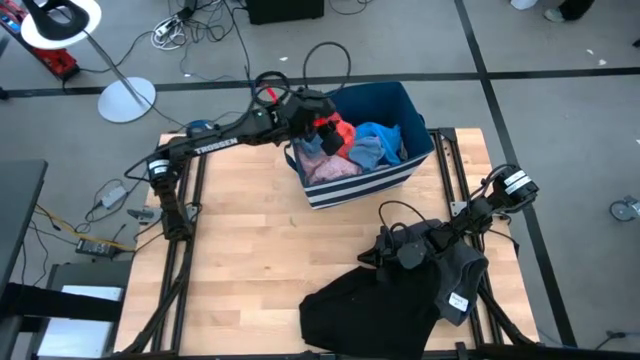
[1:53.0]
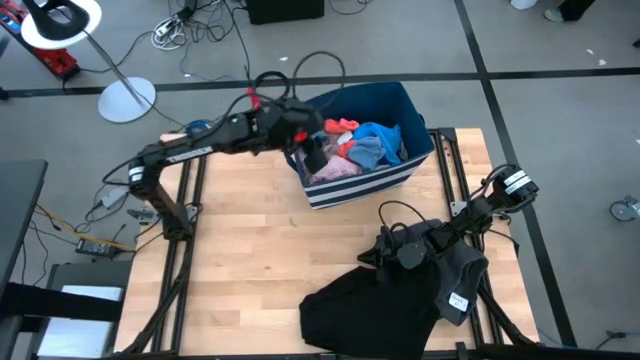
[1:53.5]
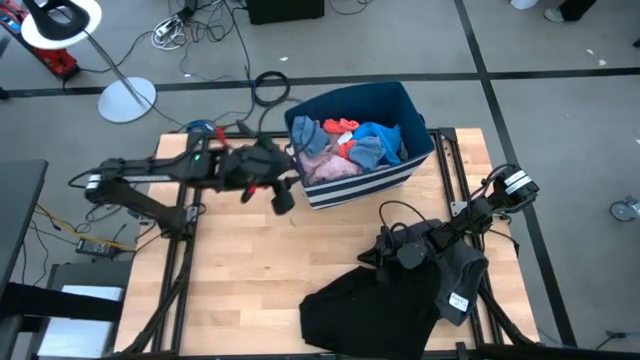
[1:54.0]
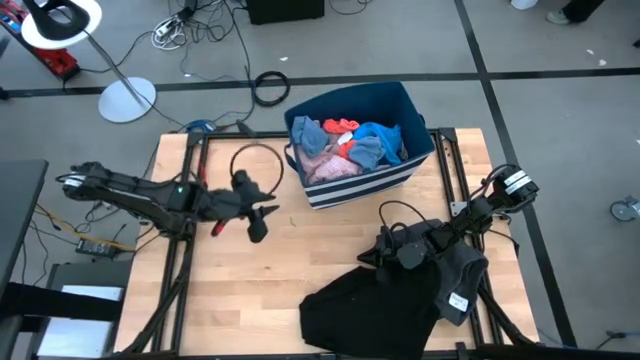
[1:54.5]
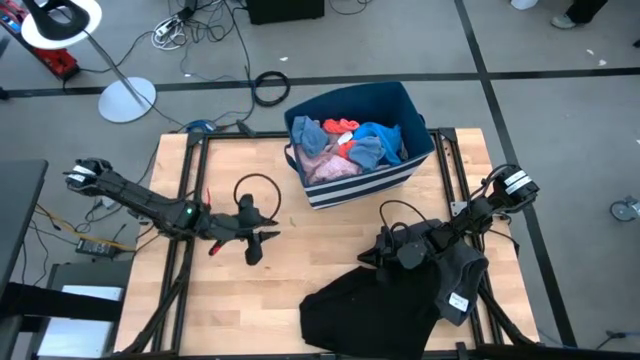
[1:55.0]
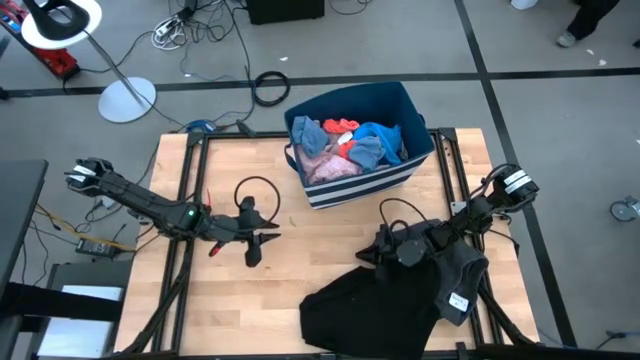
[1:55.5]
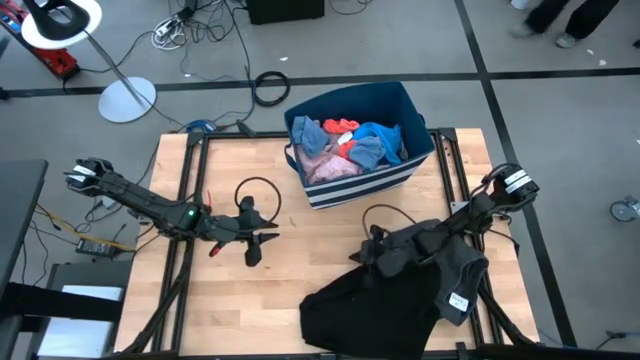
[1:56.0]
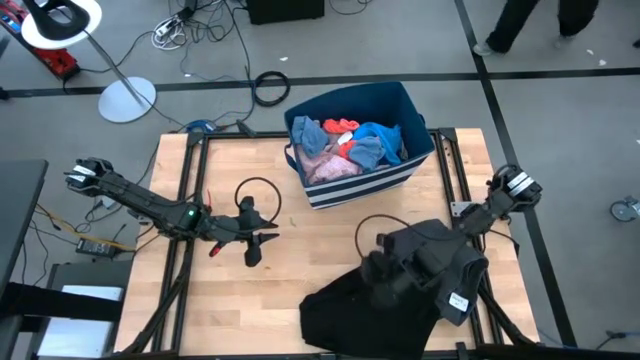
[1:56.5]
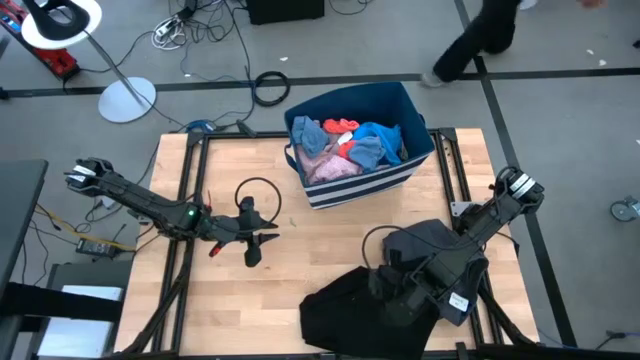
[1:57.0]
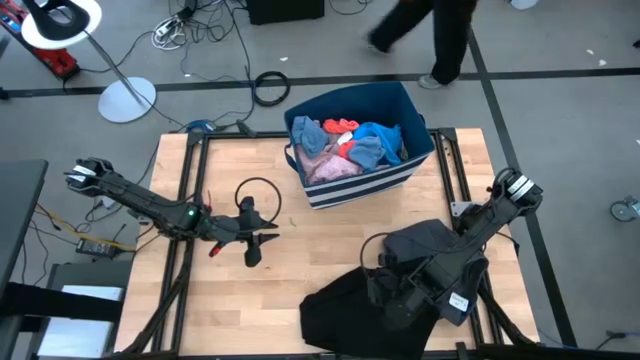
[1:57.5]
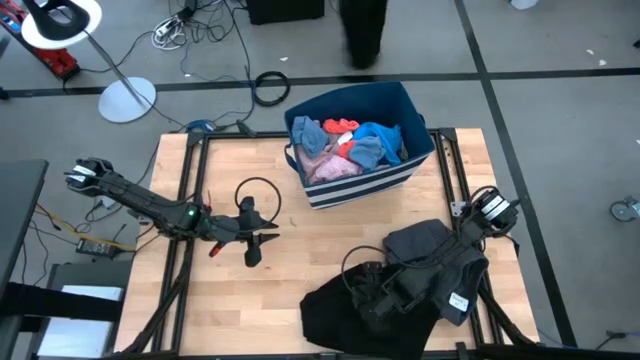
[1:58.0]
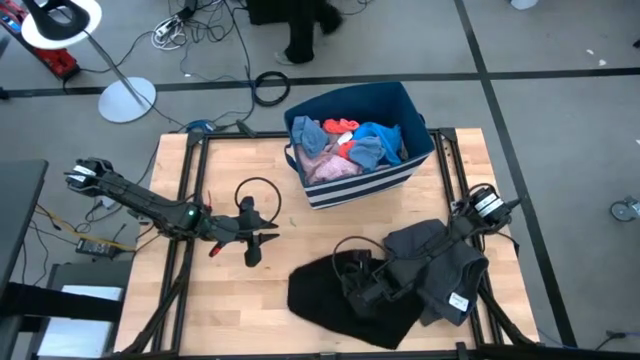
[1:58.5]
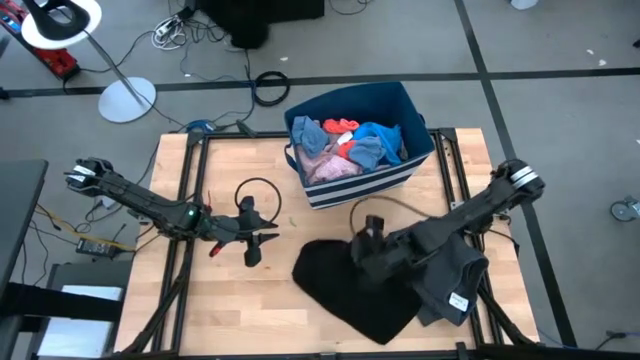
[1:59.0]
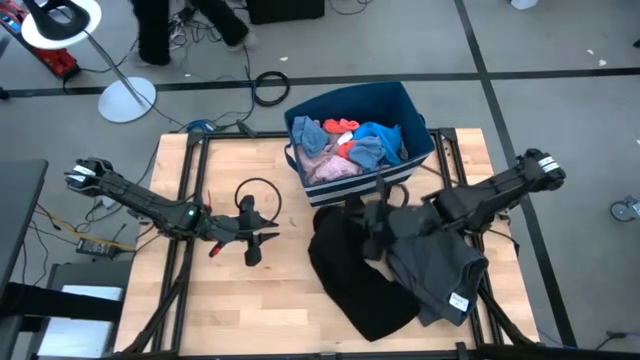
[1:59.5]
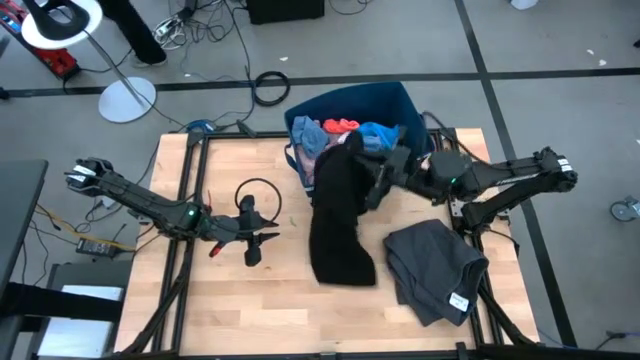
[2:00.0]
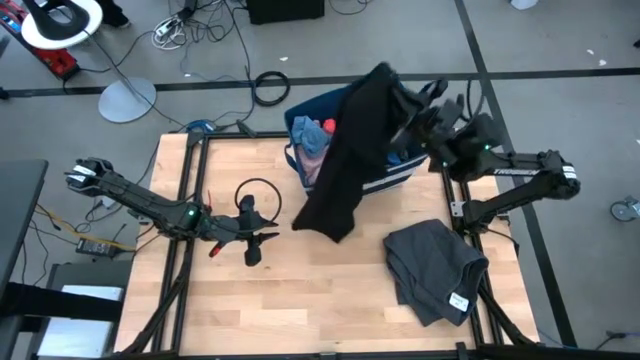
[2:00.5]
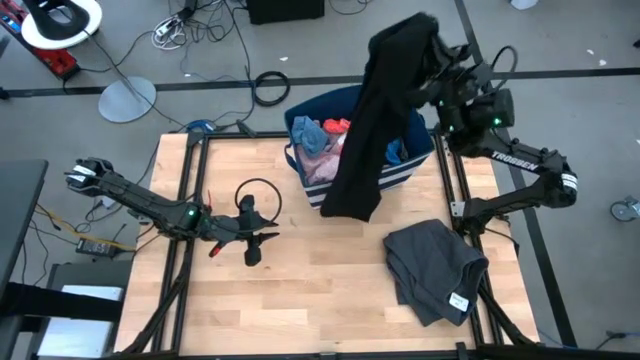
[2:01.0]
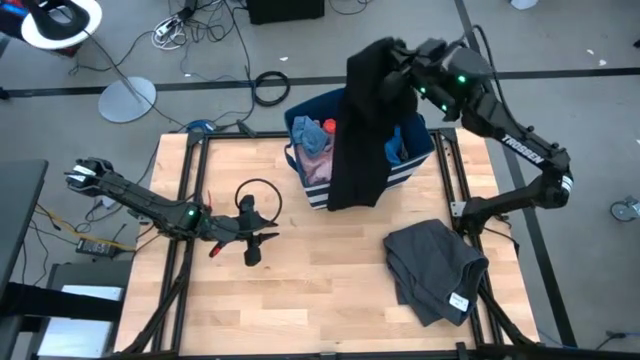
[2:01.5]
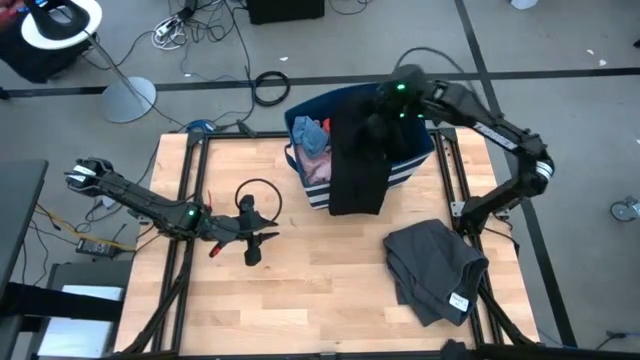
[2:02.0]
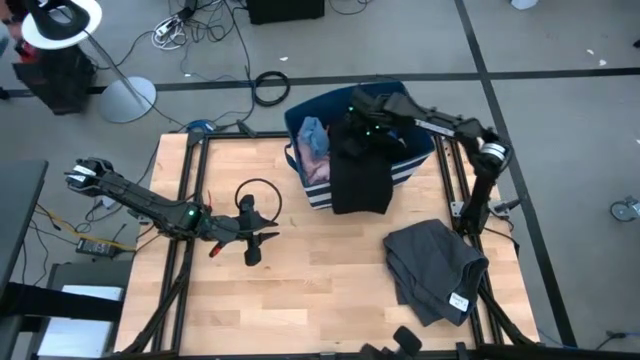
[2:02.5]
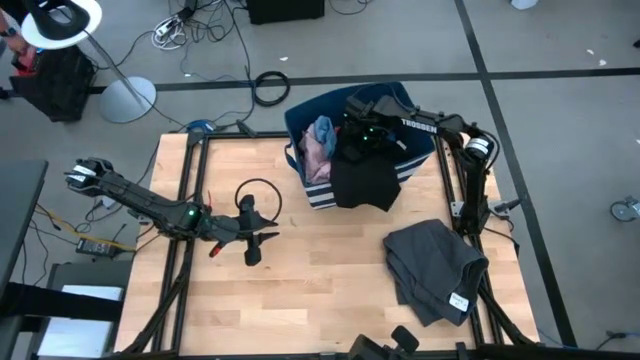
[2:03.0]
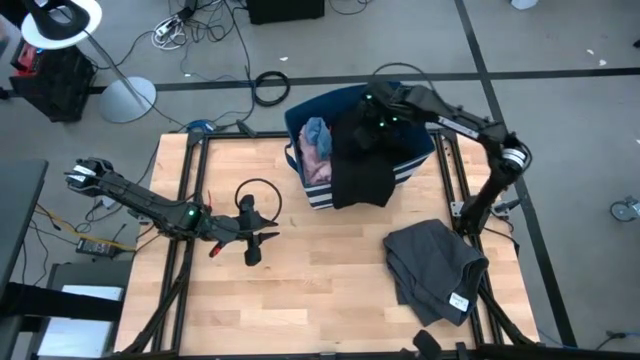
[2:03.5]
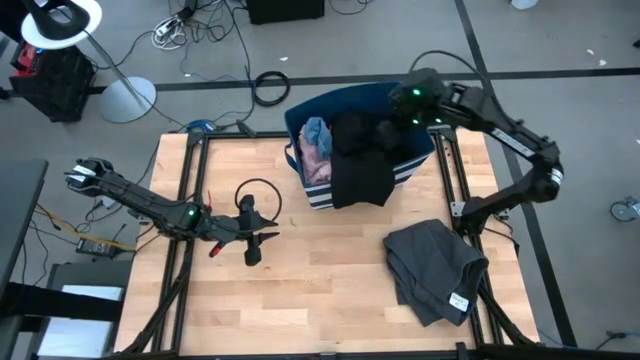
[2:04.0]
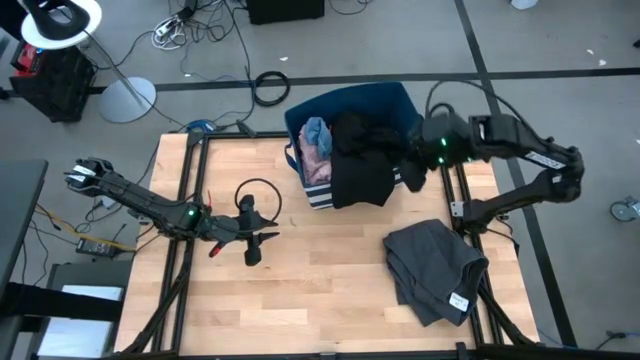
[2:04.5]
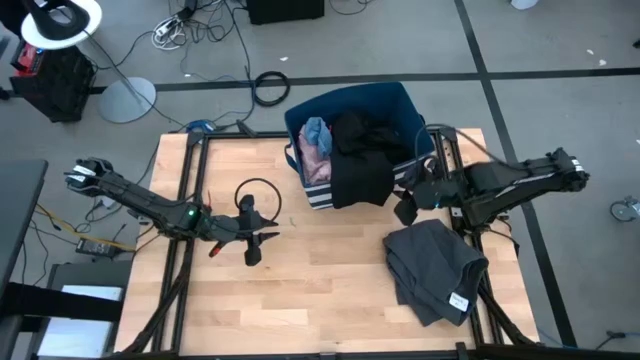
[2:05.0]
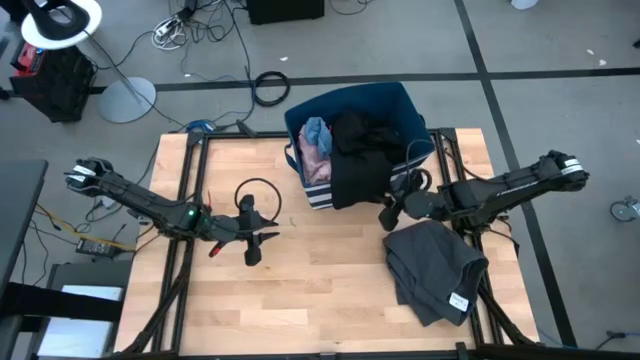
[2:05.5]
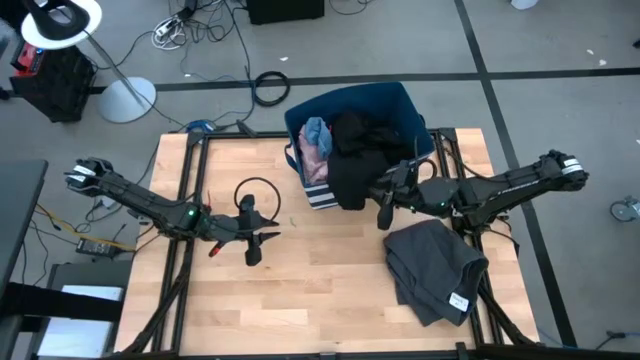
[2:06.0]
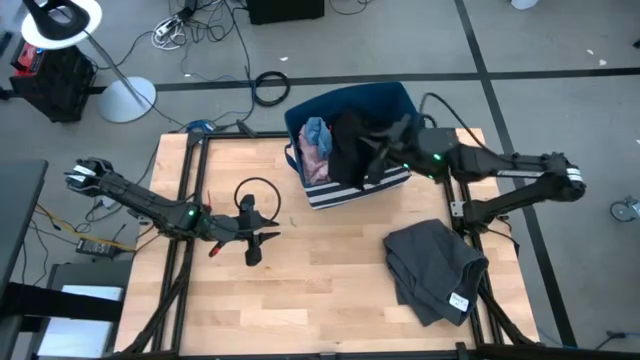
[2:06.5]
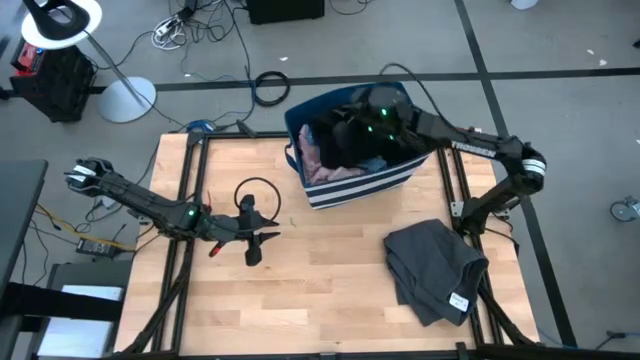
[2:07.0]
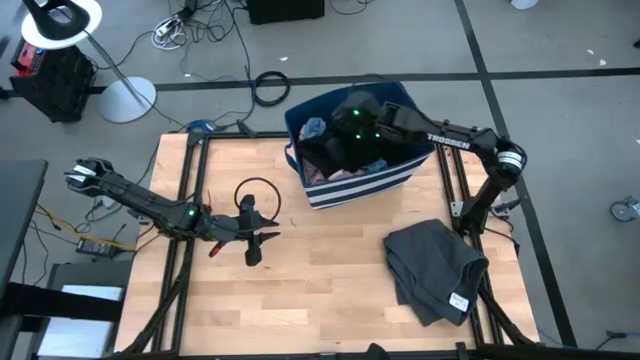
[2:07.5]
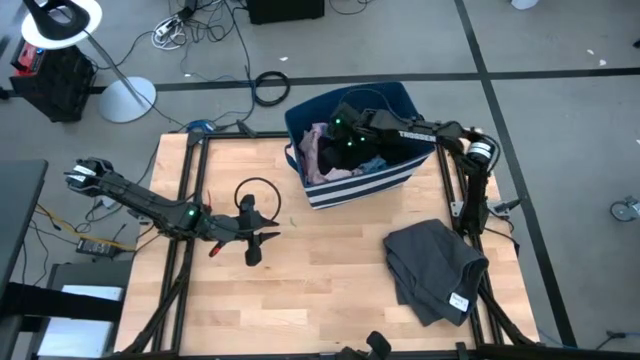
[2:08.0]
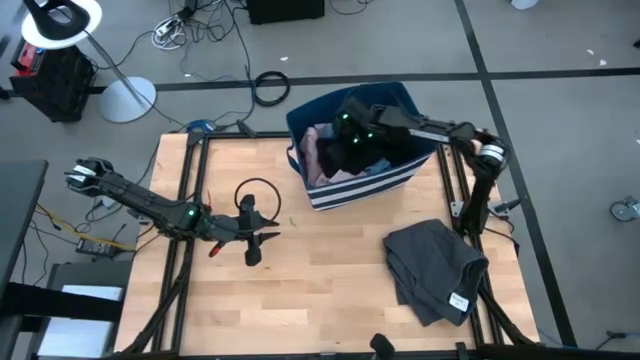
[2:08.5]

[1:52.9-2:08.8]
Task: Sort clothes
Put the black shirt in the blue laundry bin organizer

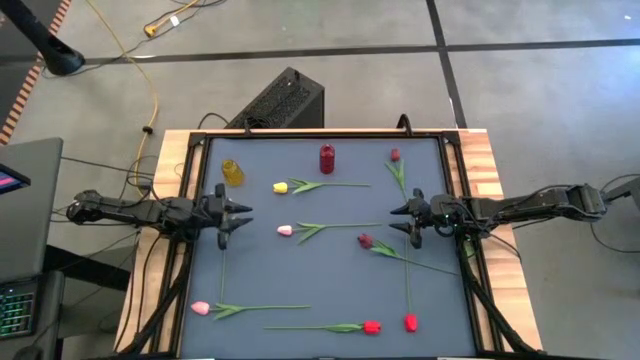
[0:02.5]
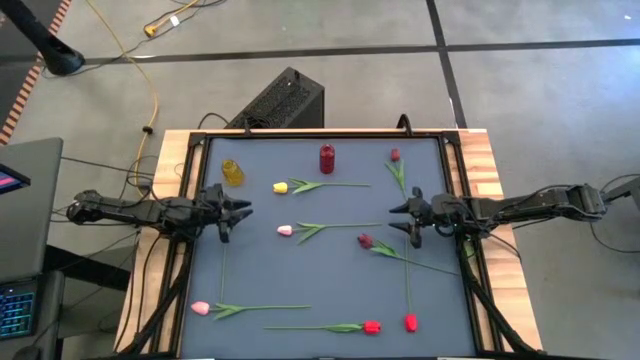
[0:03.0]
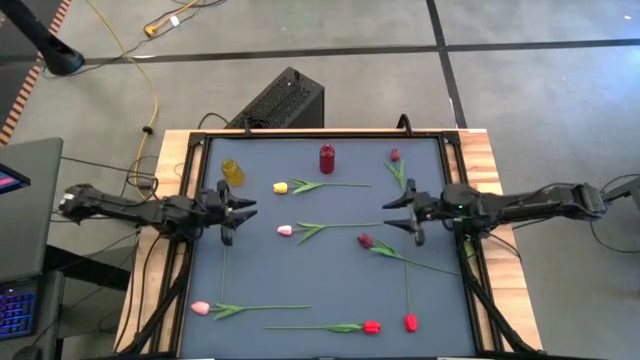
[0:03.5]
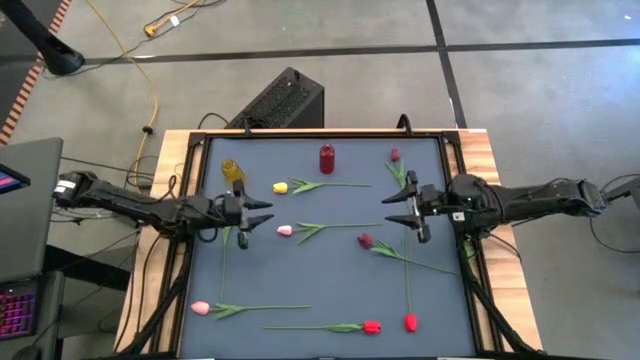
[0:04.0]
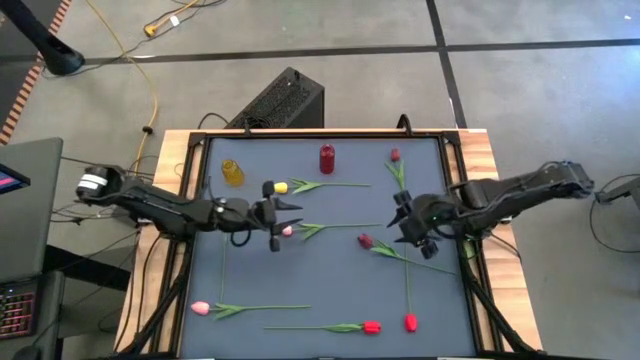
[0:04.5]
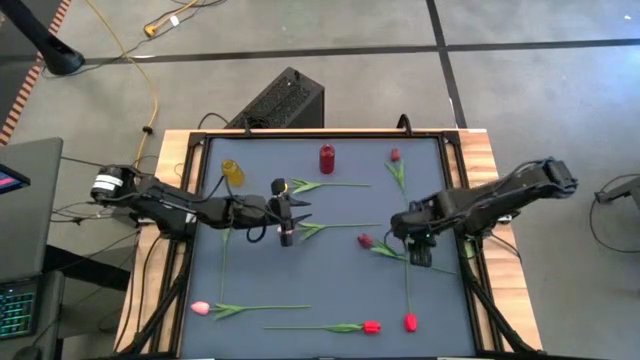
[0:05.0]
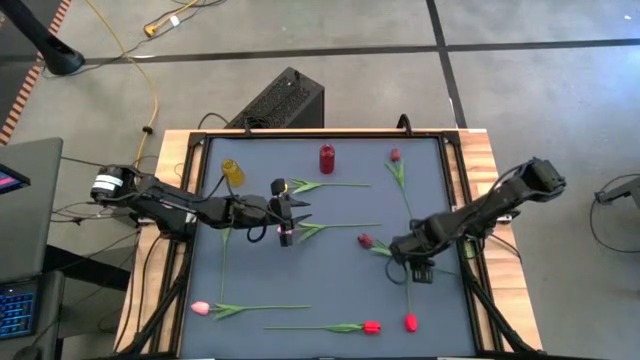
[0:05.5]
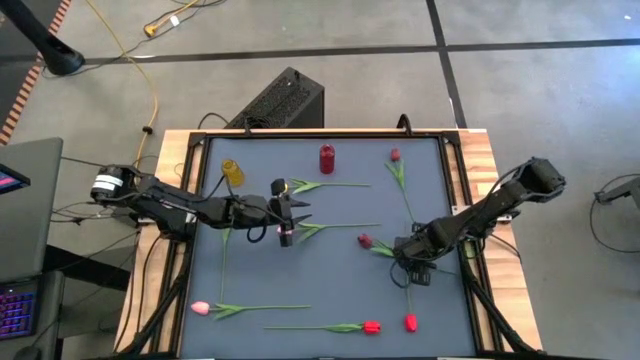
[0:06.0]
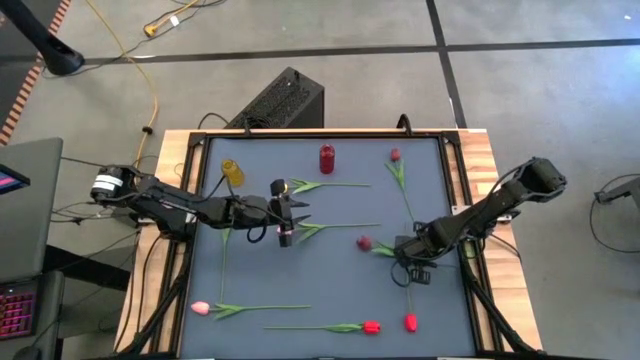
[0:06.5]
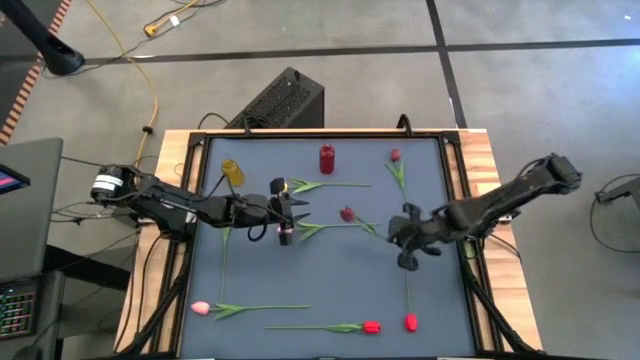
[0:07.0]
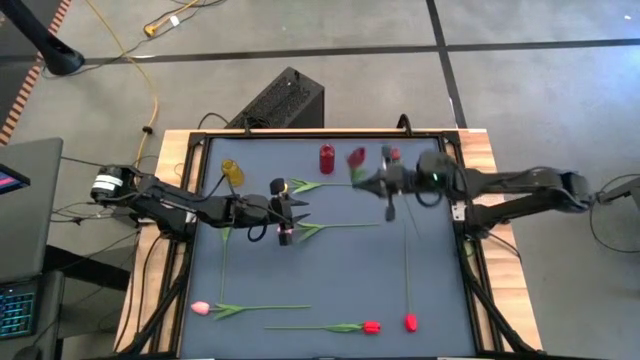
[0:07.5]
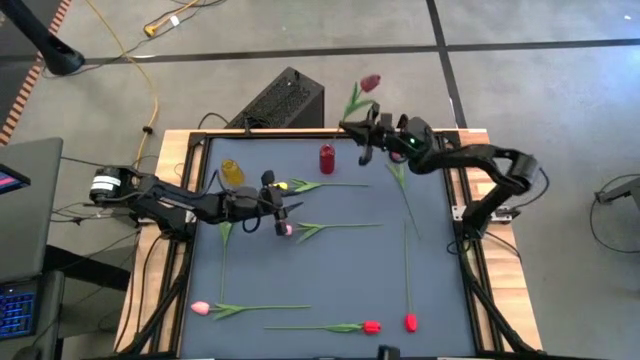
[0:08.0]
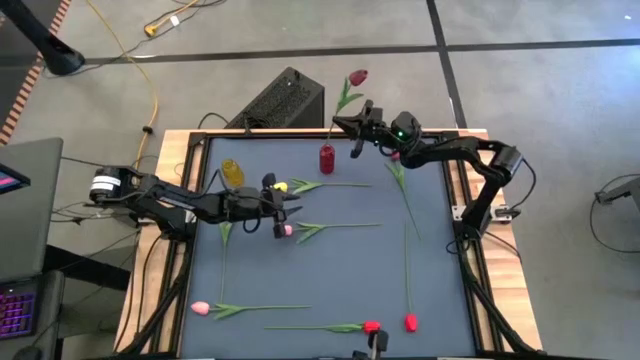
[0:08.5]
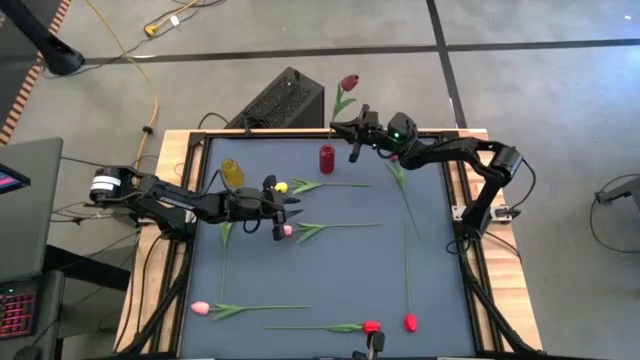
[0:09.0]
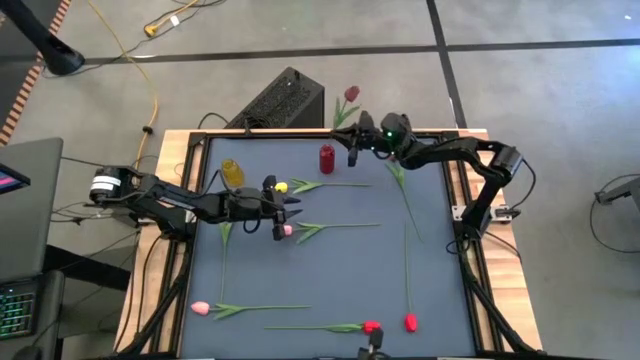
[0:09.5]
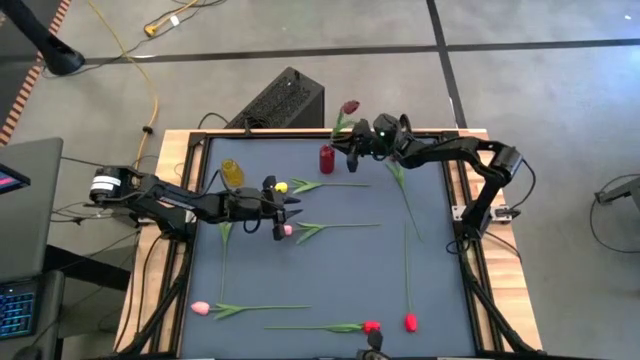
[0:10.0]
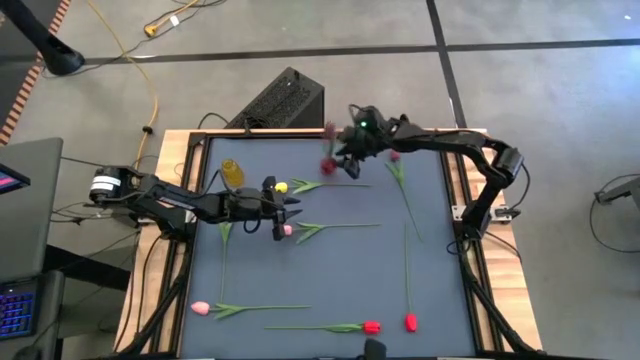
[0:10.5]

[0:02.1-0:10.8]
Task: Sort flowers into vase by color
Put the bottom dark red flower into the red flower vase
